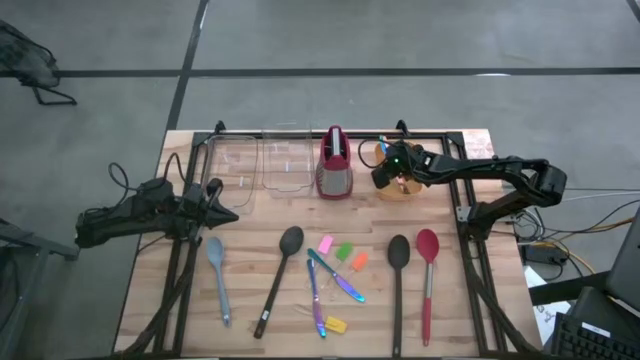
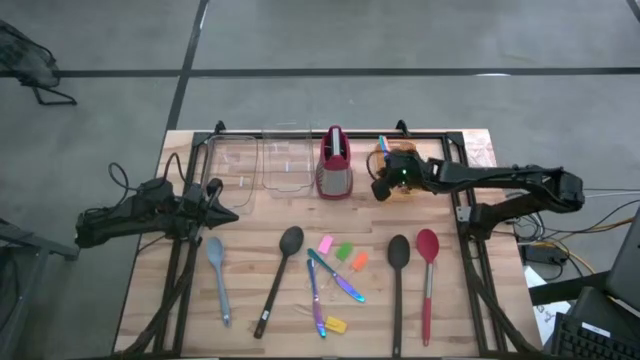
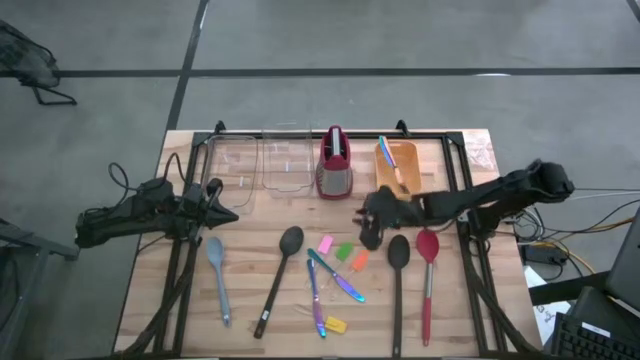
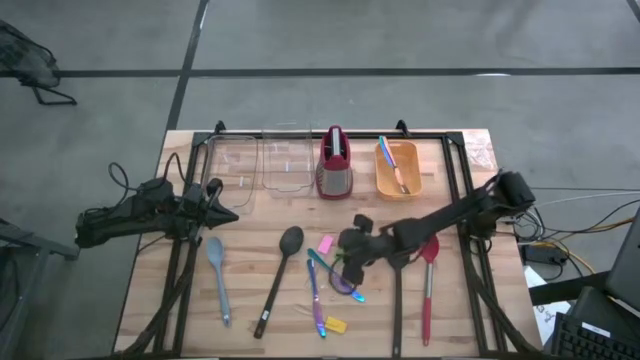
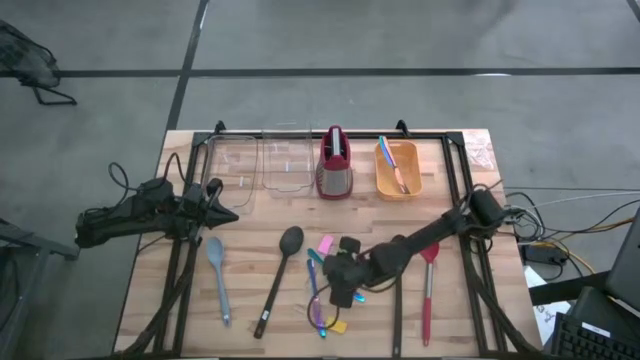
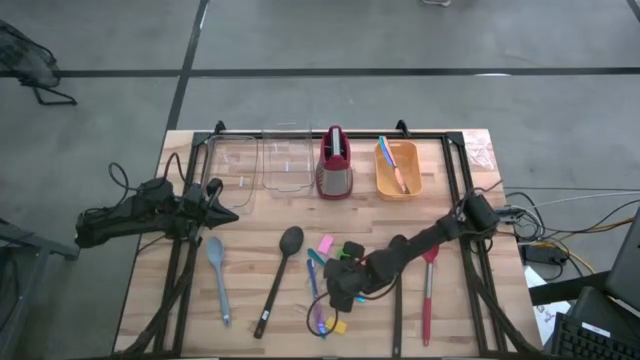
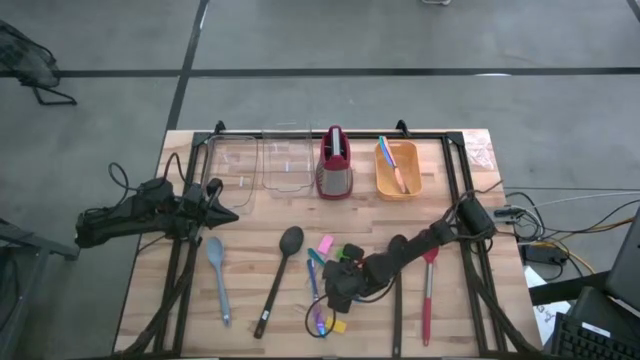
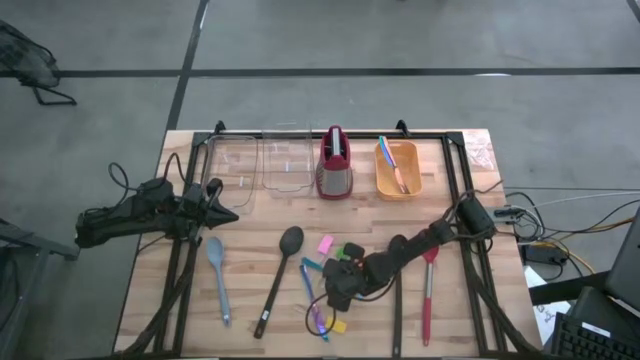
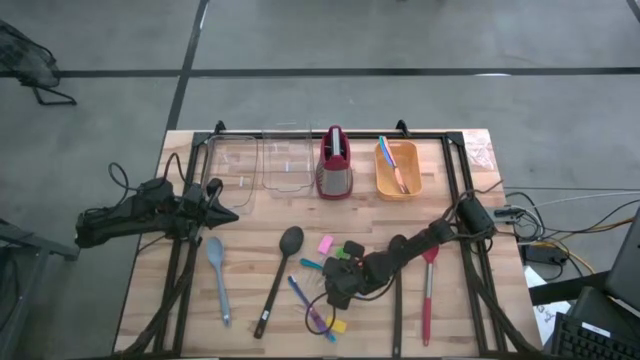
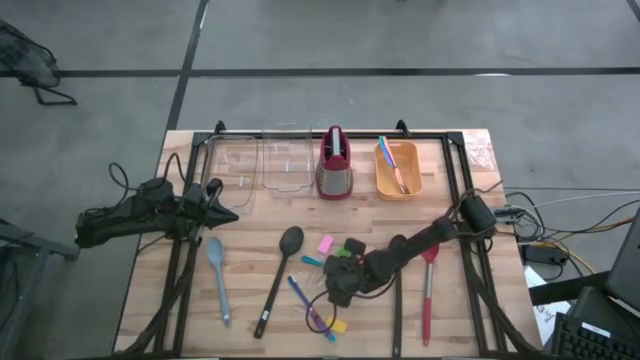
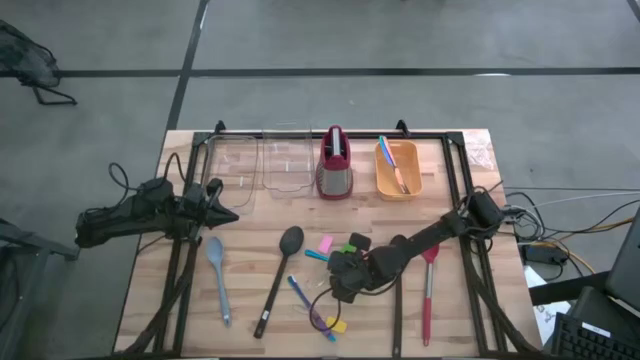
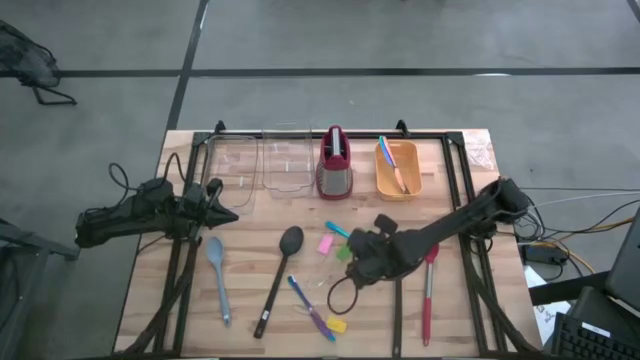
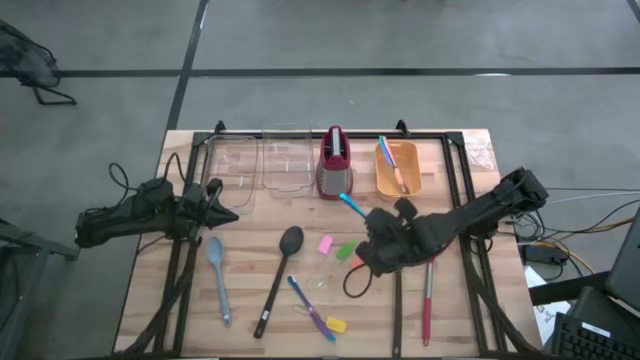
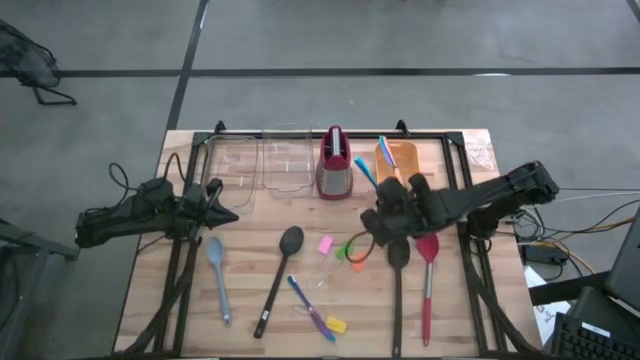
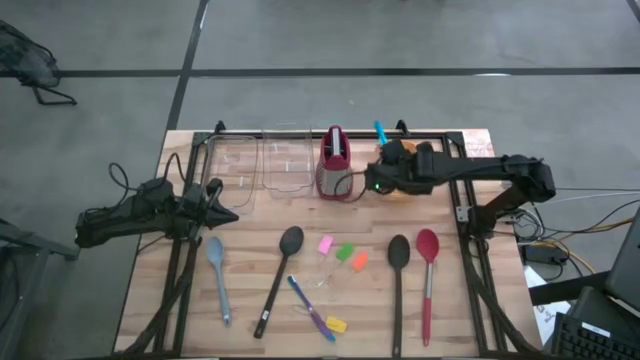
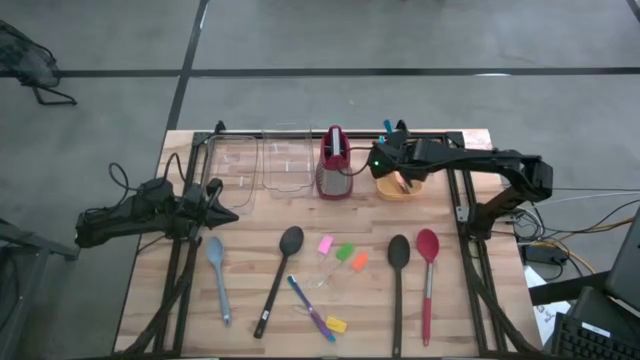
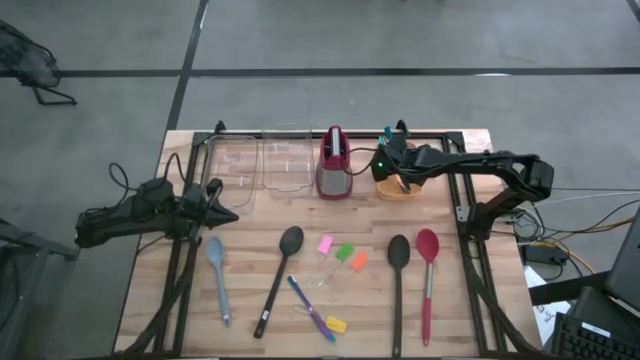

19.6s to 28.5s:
Task: Pick & Place Kitchen Items
Put the top blue knife into the yellow bin

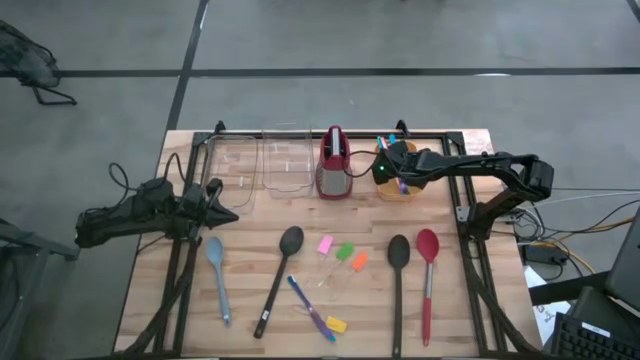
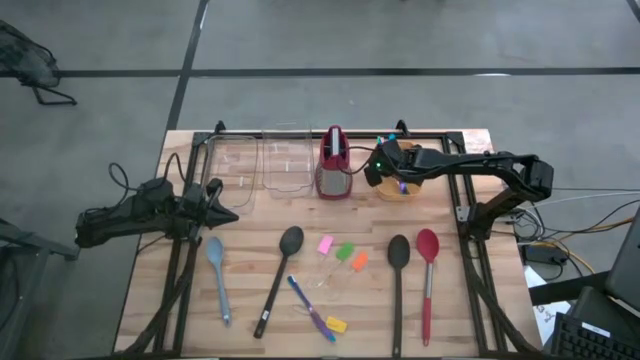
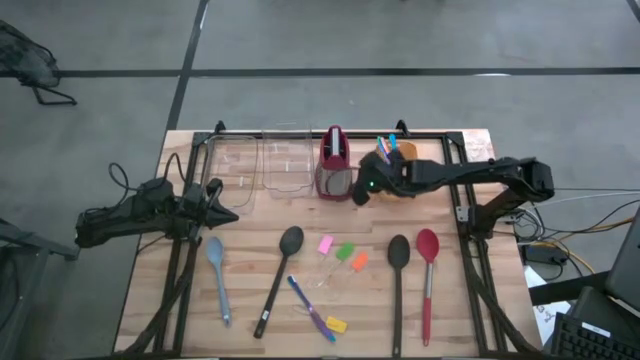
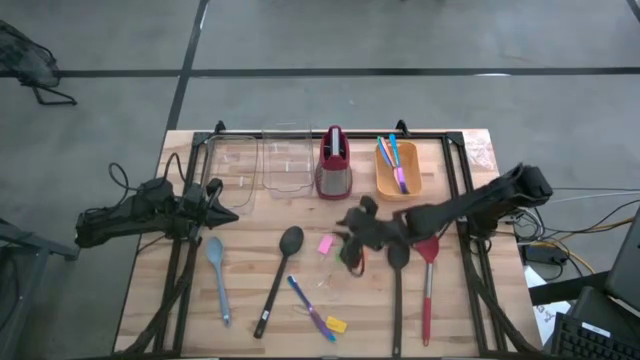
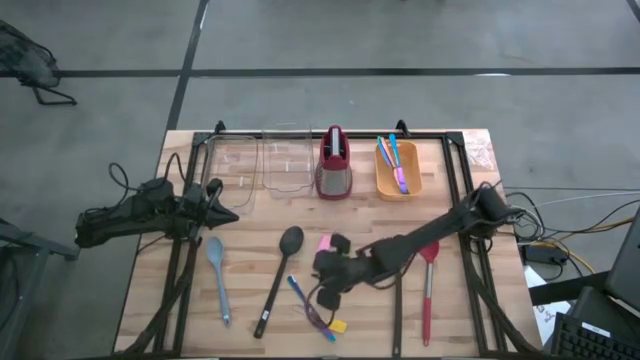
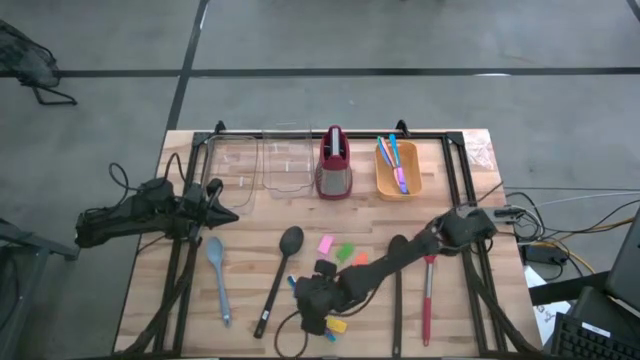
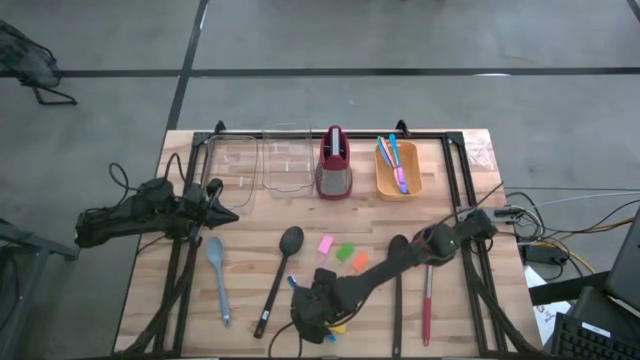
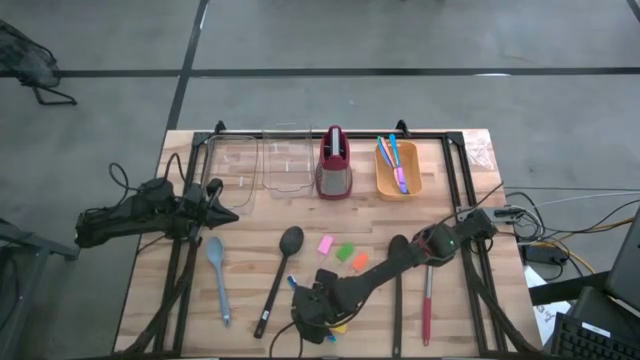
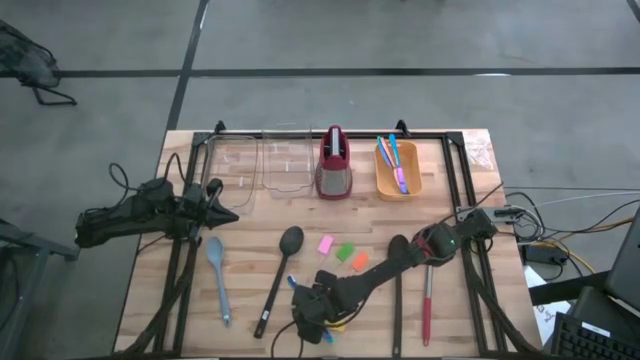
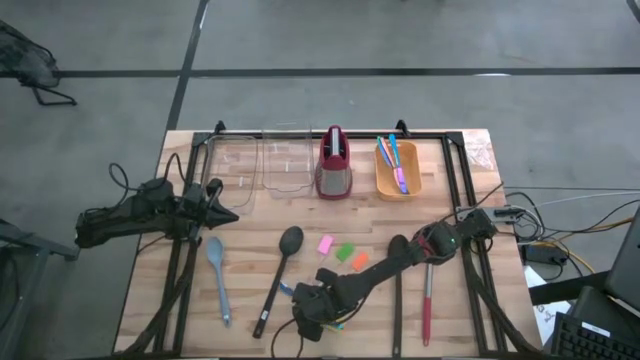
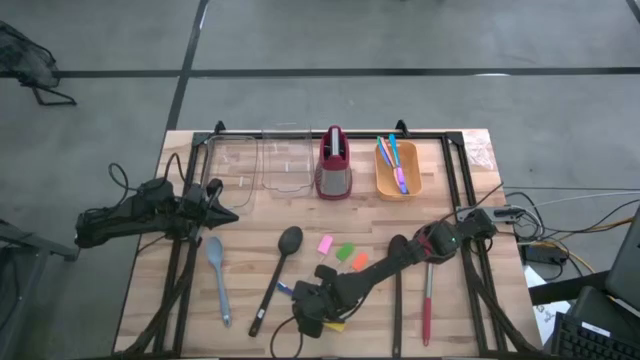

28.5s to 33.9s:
Put the blue knife into the yellow bin

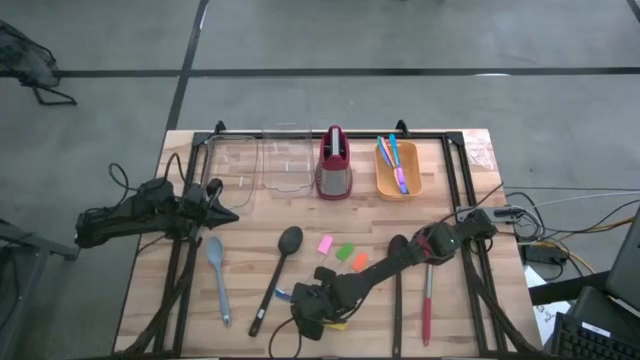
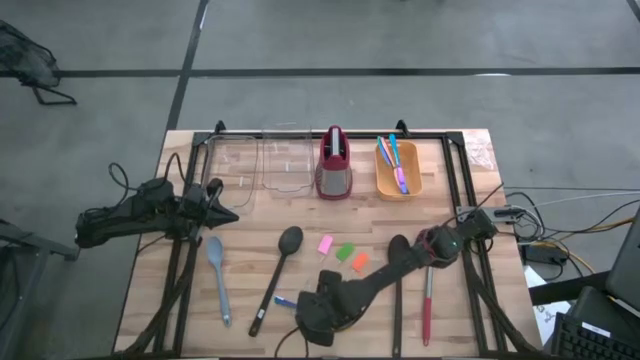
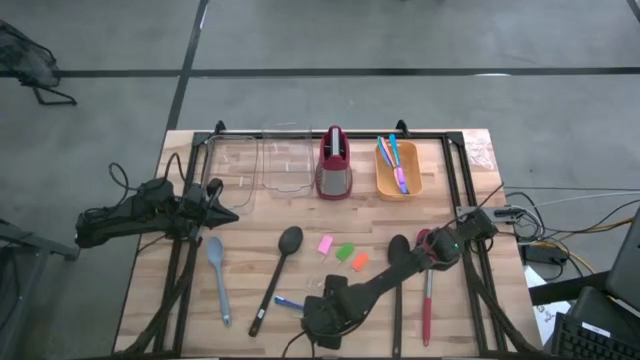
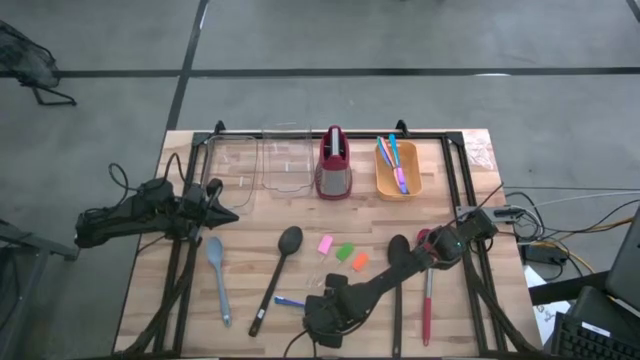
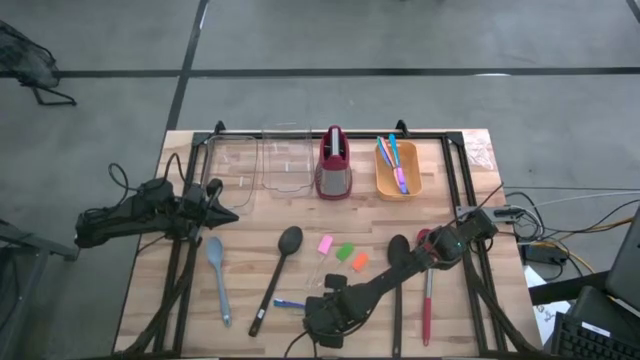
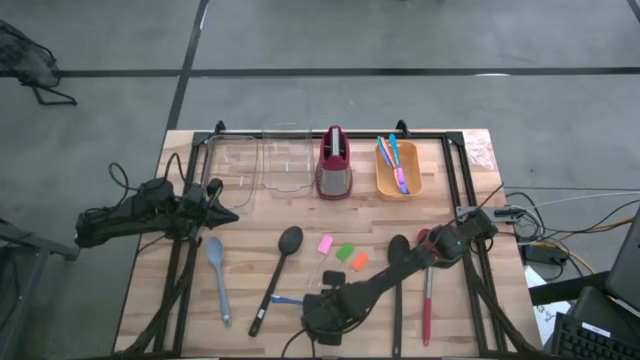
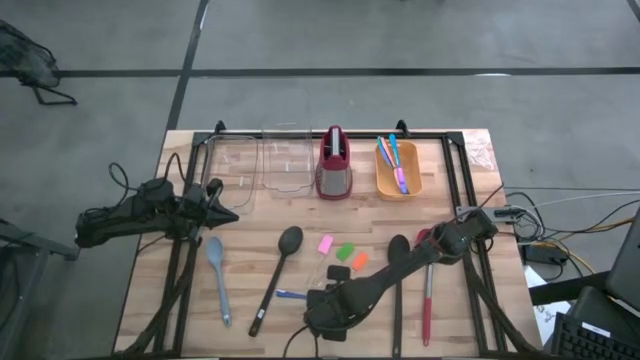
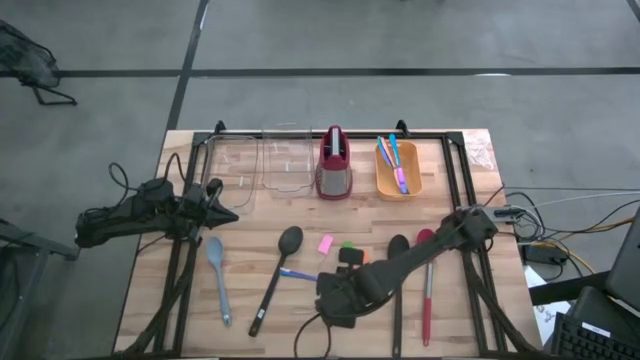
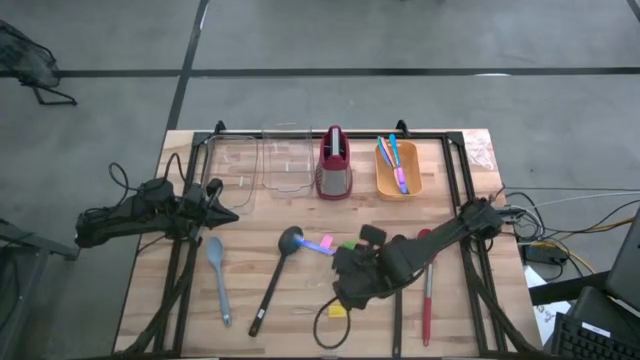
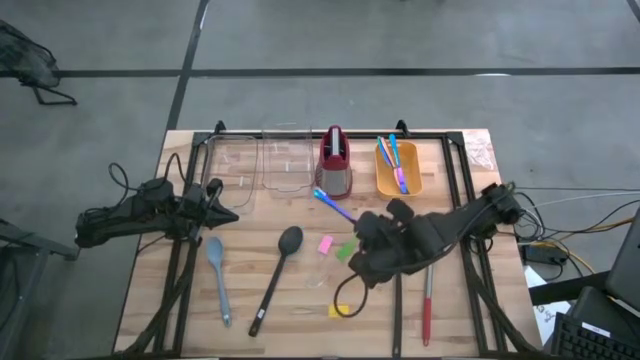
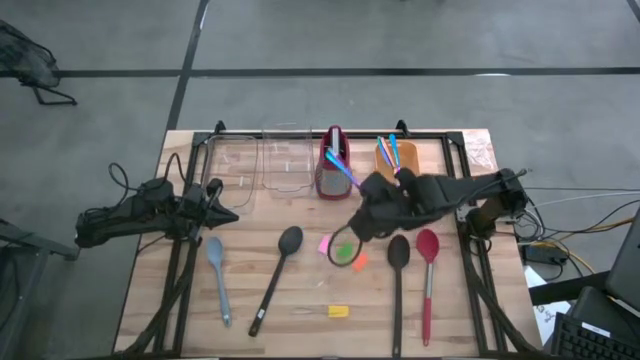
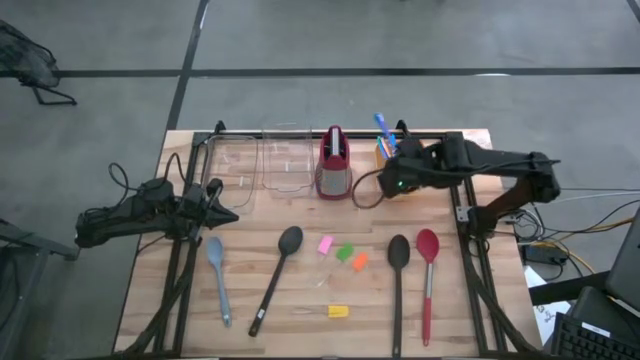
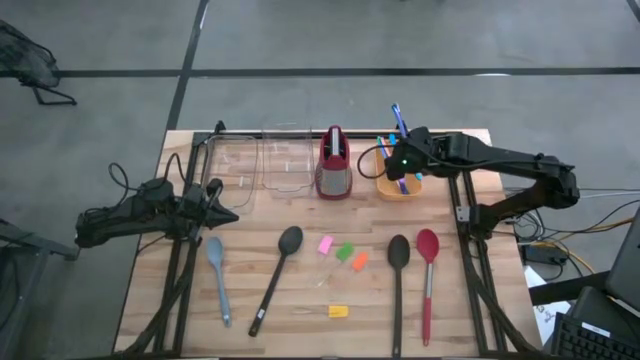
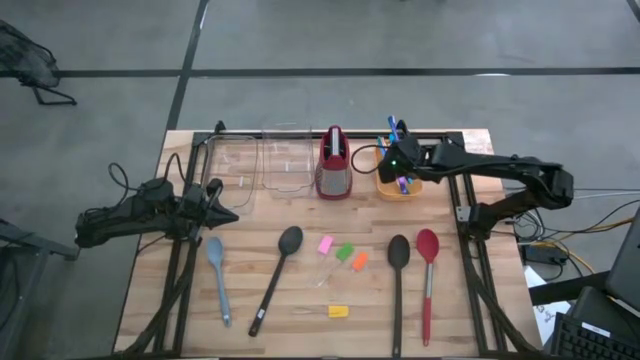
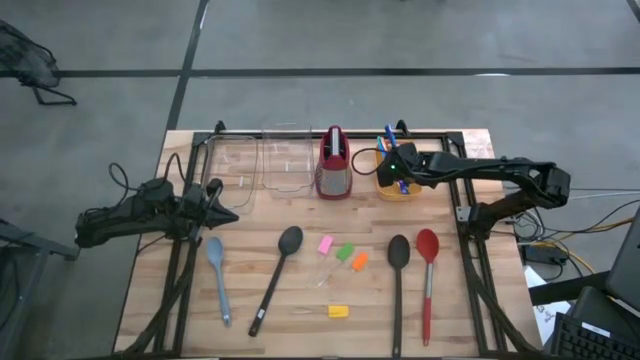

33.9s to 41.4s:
Put the blue knife into the yellow bin
